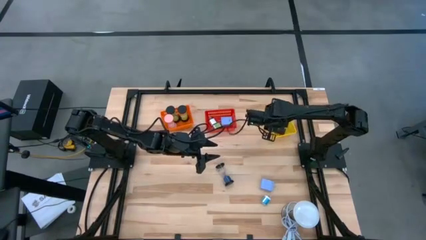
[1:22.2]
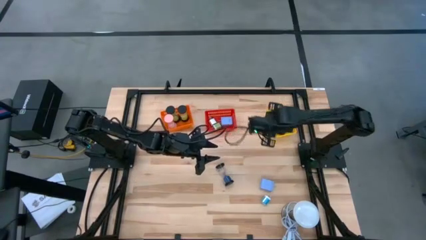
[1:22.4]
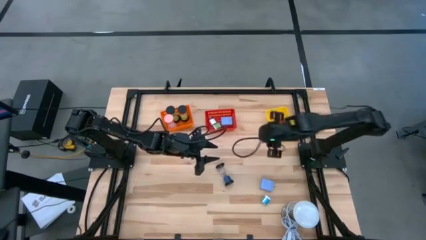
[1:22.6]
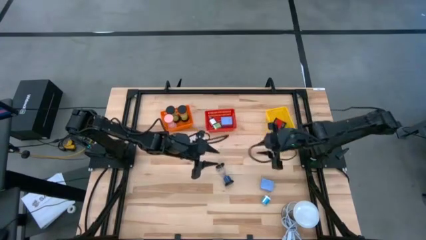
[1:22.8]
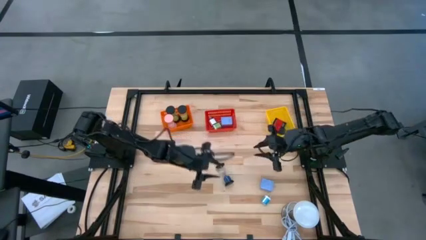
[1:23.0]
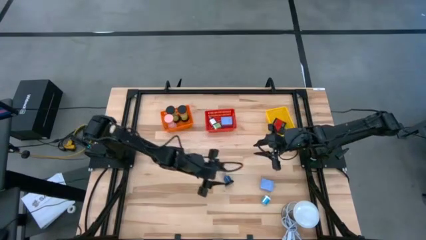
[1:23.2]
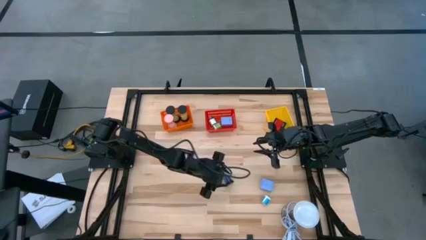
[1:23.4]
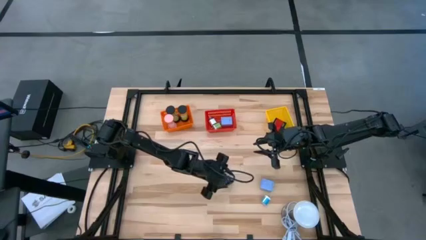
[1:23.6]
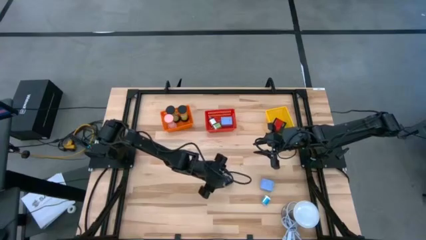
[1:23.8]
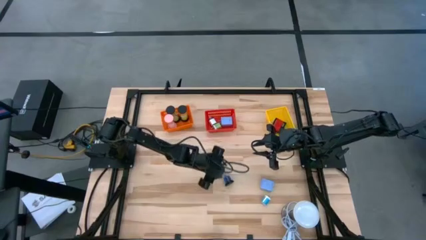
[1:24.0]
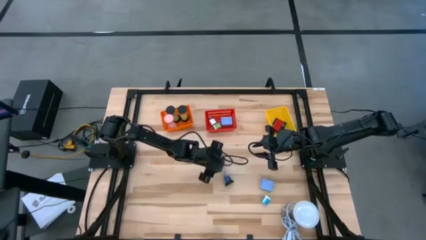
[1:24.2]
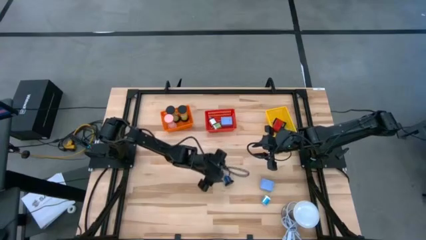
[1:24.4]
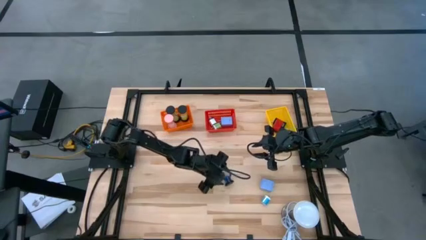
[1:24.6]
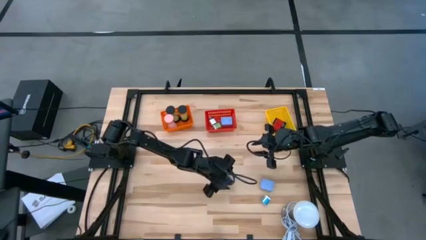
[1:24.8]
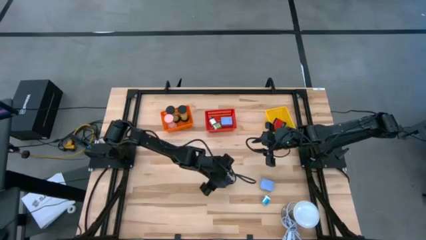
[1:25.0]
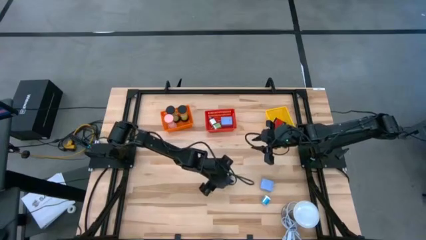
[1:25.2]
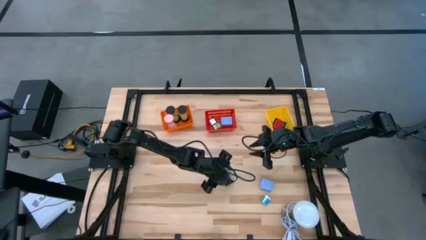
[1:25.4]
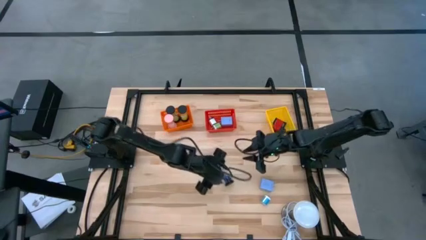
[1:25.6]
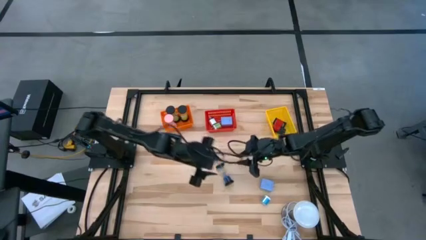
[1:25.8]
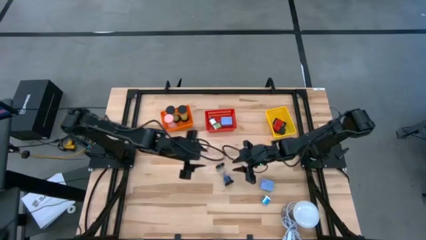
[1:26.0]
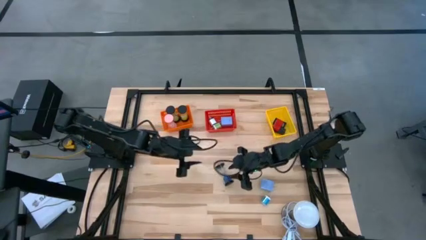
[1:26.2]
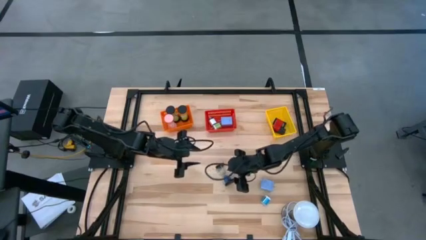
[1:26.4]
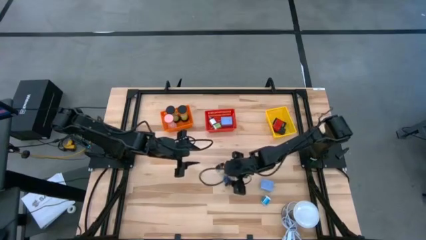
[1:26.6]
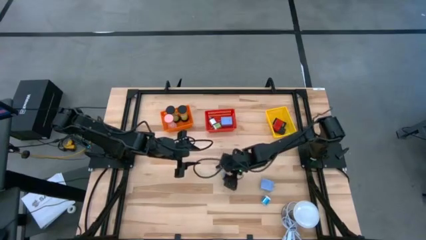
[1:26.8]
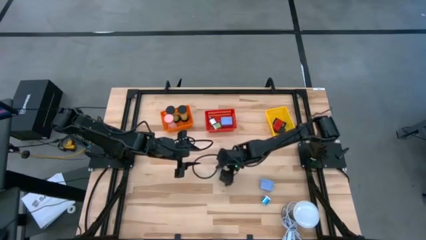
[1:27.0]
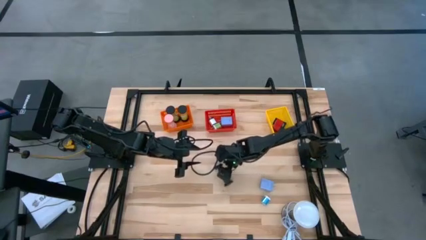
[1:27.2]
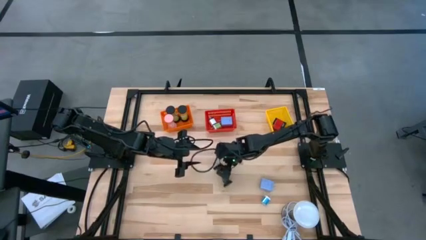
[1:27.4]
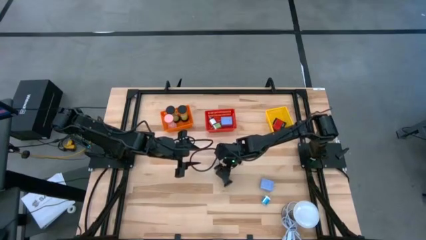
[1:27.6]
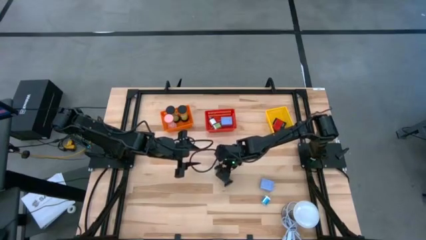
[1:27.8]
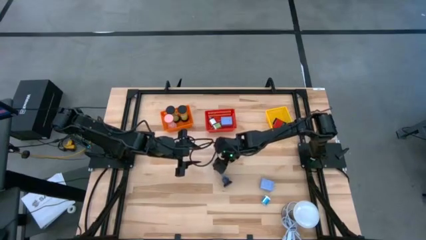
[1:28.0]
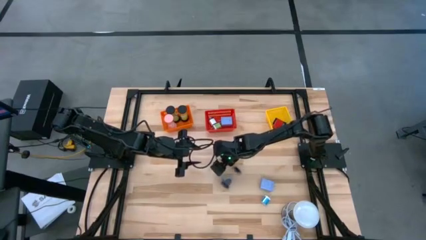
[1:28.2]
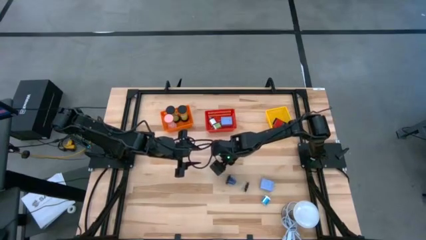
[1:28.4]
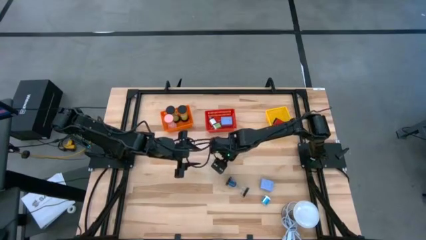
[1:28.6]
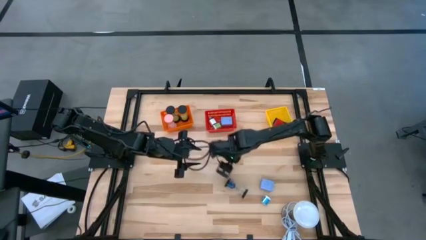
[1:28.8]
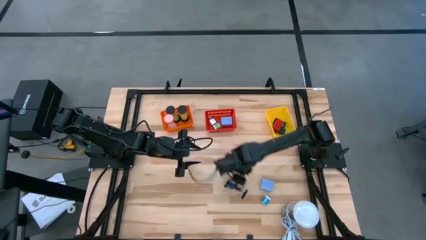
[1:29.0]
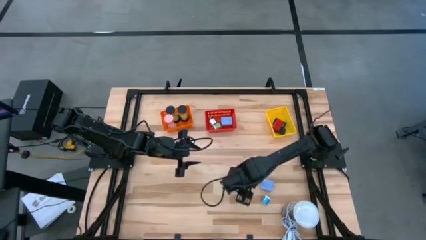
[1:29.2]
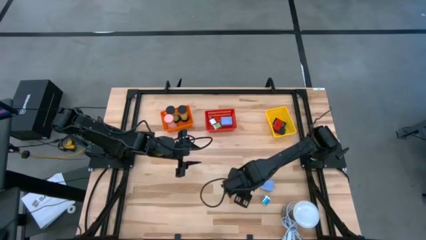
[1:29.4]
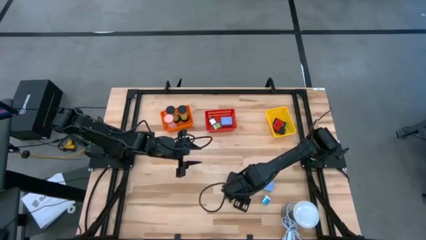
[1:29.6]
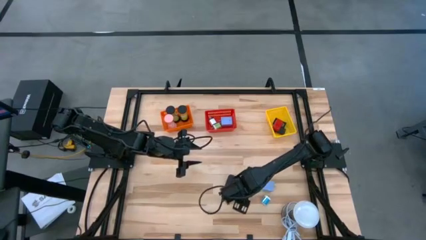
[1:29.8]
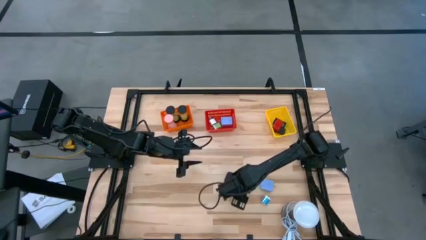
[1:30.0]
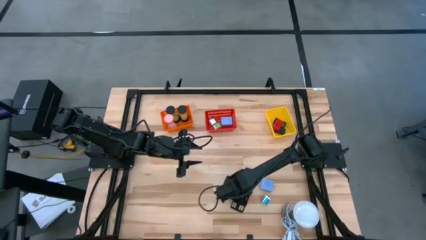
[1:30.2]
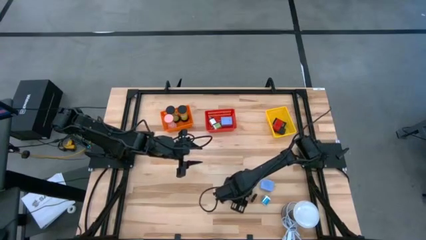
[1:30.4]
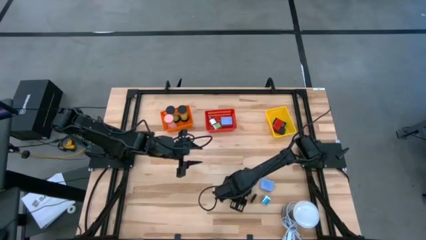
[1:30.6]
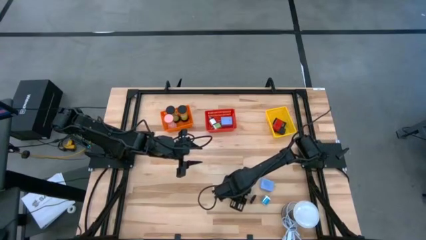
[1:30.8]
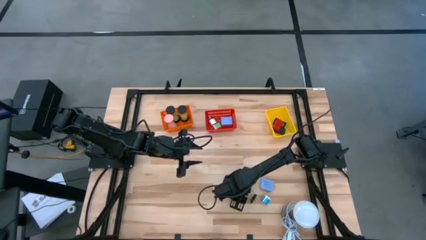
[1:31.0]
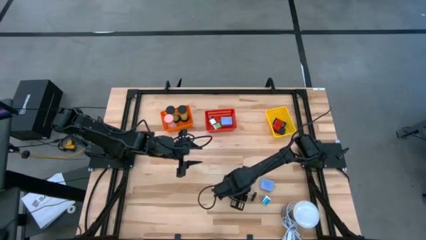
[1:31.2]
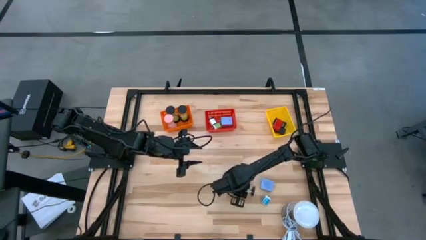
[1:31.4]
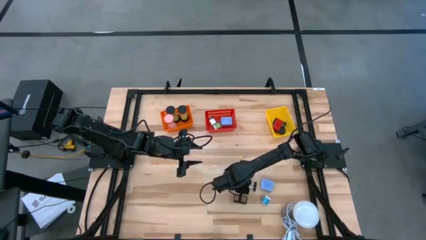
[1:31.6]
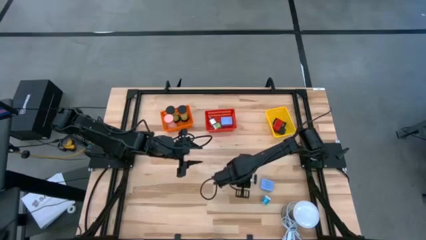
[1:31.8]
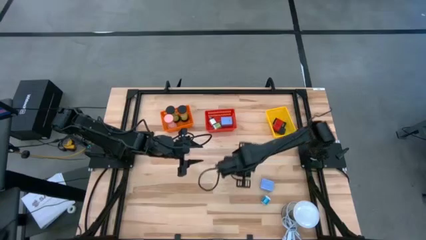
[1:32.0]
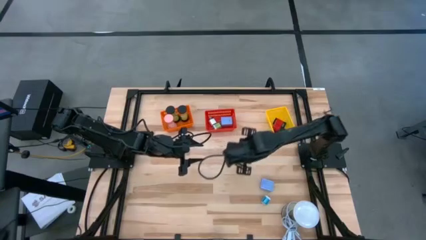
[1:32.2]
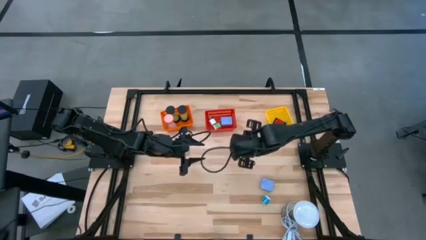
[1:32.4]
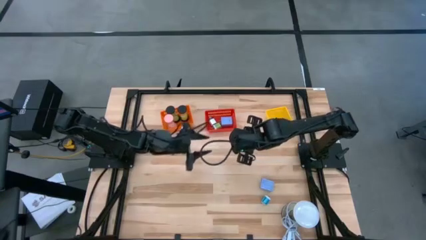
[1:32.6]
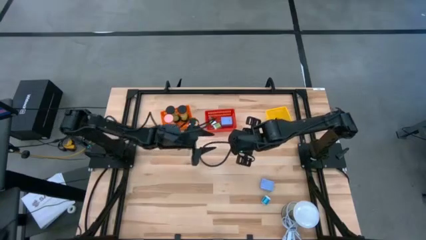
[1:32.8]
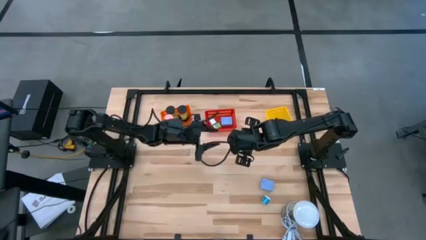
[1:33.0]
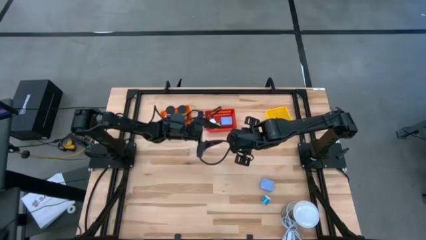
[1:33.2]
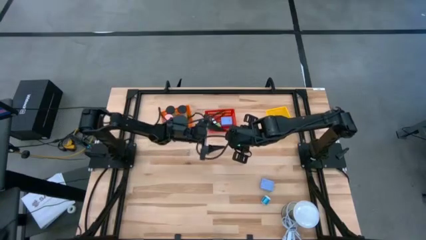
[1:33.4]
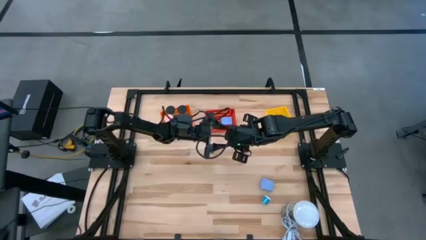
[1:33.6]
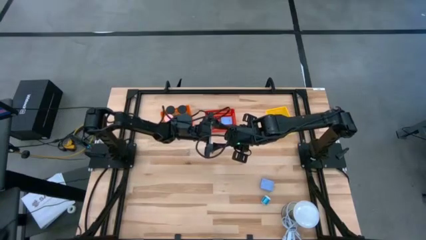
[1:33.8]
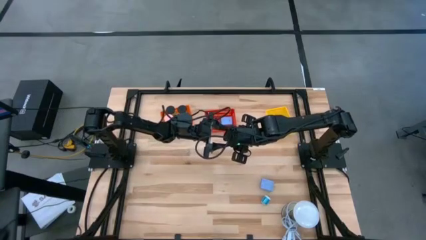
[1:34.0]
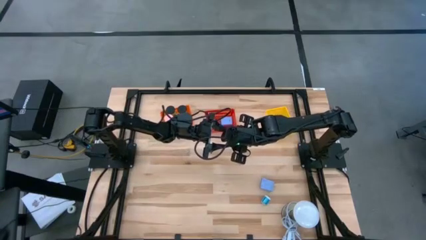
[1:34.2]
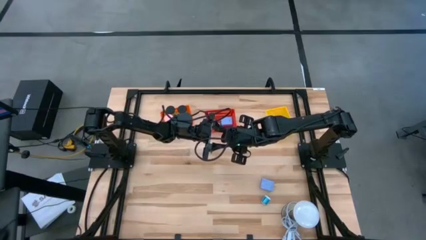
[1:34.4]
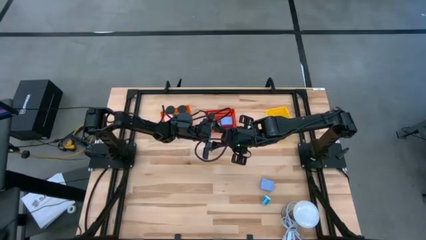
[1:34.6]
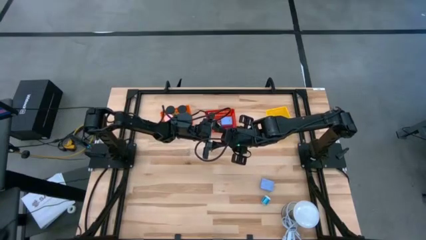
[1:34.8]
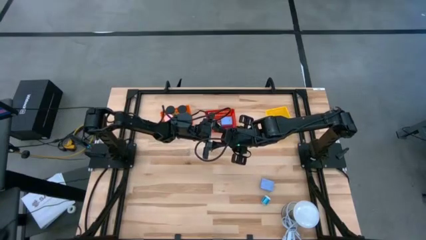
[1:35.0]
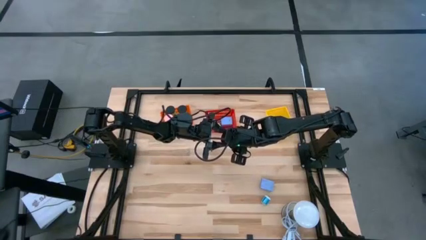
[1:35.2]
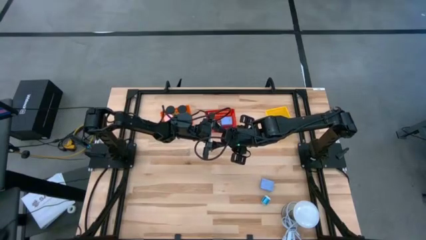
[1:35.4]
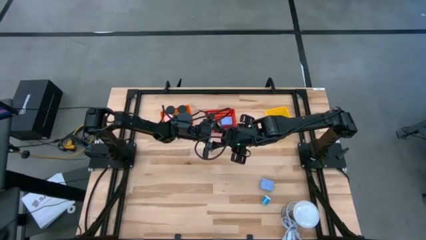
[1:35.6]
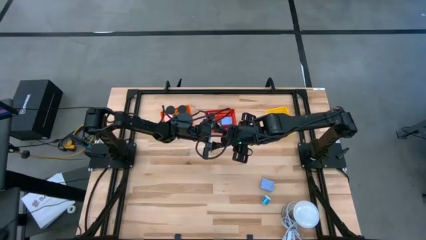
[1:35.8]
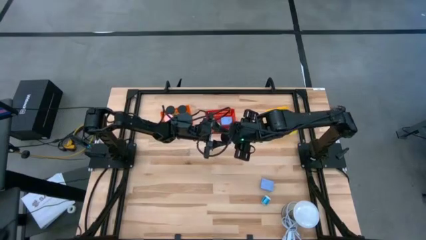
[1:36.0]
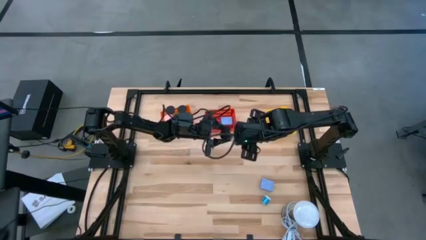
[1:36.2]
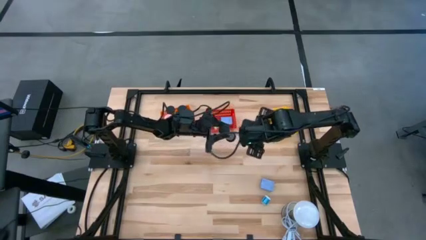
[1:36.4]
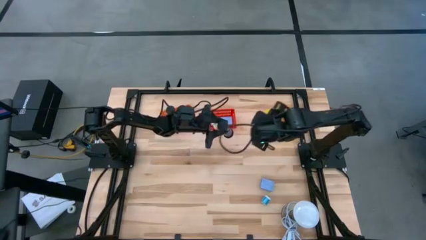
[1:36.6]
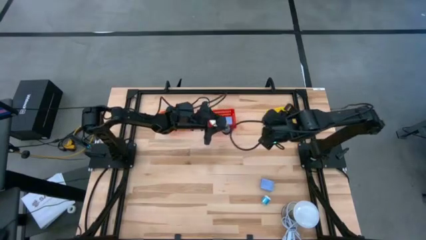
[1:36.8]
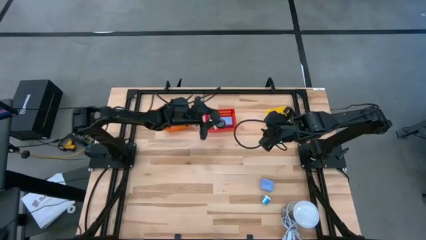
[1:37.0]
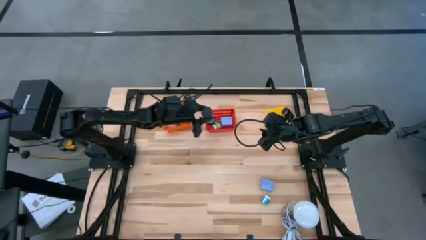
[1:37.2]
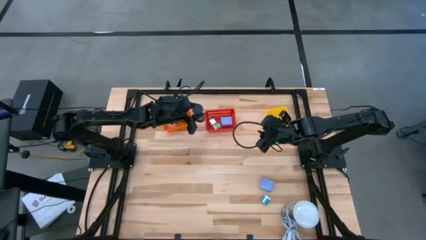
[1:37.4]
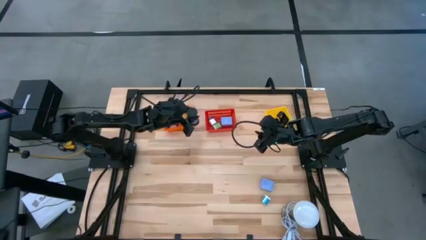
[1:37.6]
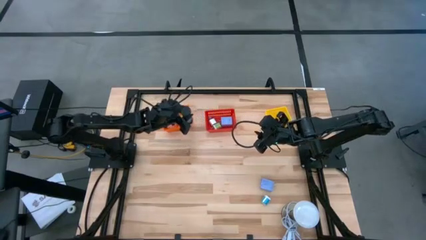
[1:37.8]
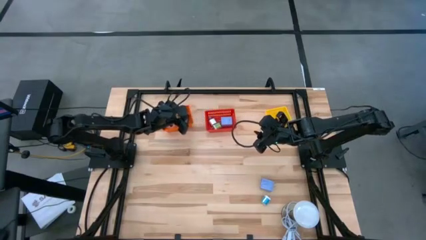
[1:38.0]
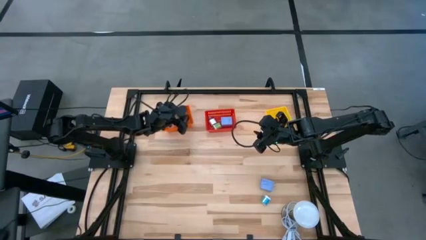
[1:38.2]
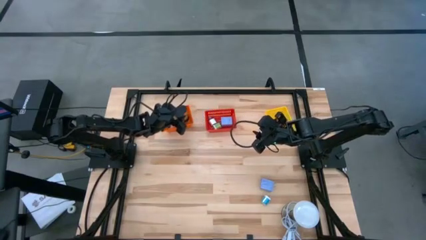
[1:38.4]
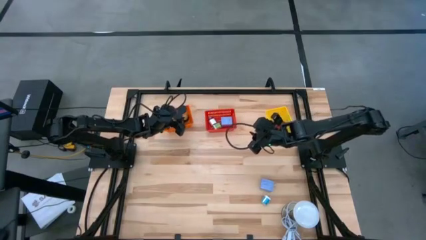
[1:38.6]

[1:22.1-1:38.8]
Task: Pick & Place Office items
Put the blue hourglass into the orange bin

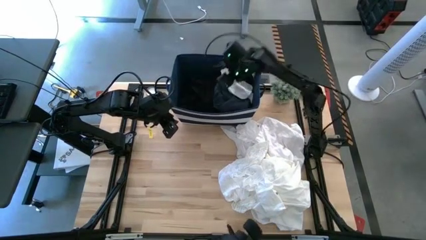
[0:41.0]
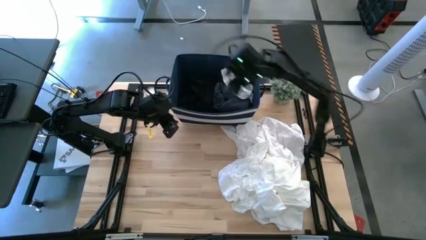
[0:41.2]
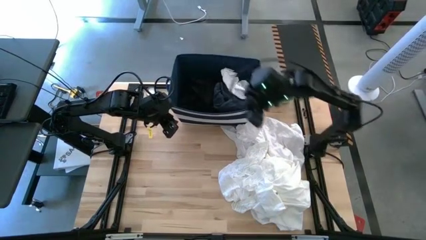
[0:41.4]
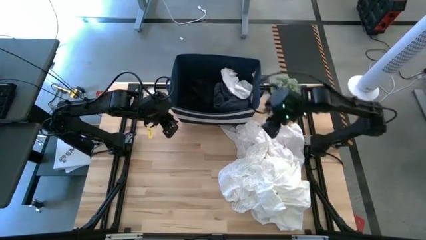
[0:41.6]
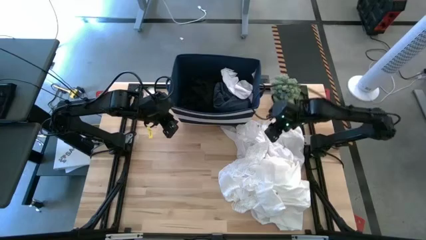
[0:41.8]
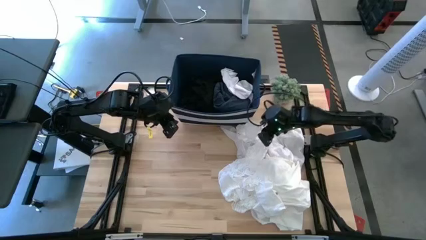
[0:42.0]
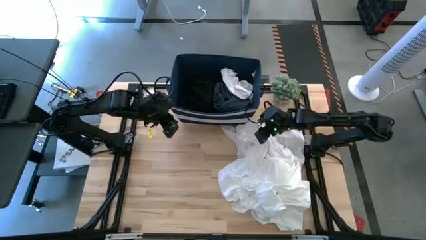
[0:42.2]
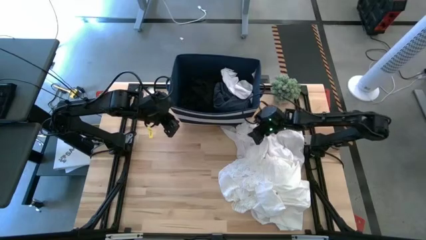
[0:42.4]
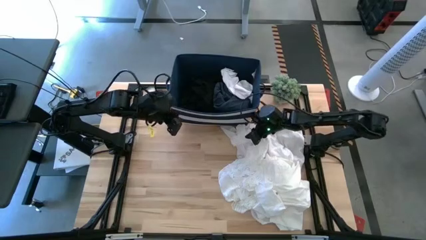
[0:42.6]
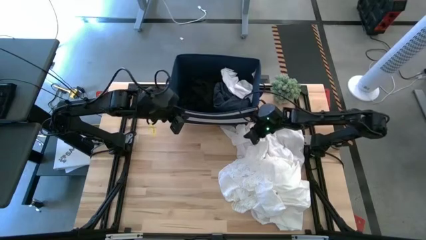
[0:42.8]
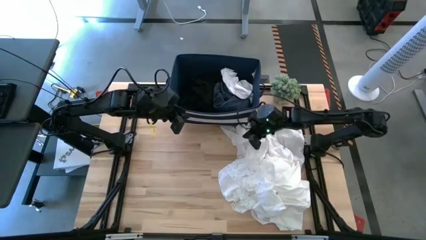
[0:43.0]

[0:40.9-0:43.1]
Task: Sort clothes
Put the white sock into the blue bin
